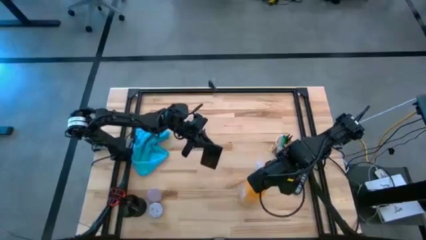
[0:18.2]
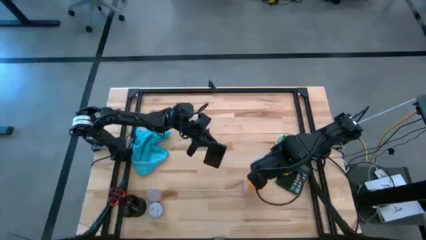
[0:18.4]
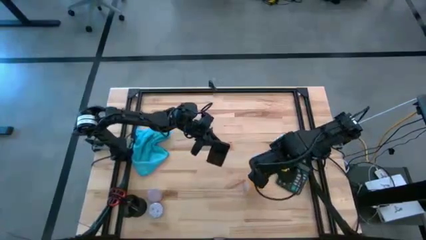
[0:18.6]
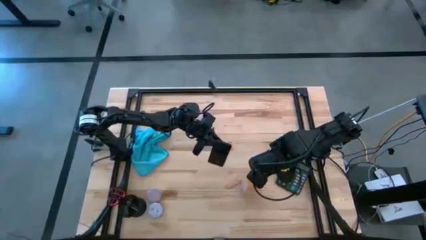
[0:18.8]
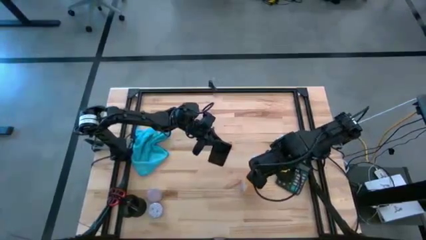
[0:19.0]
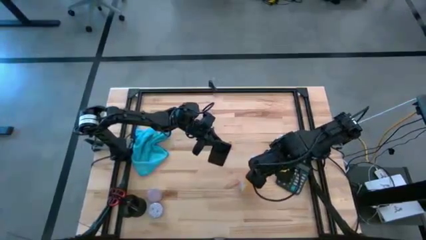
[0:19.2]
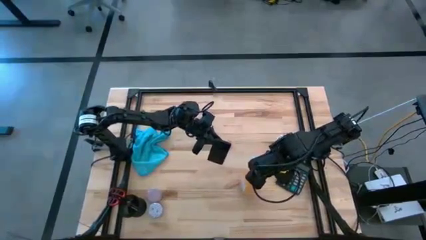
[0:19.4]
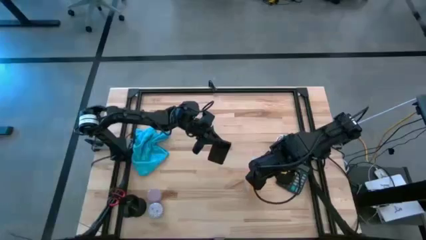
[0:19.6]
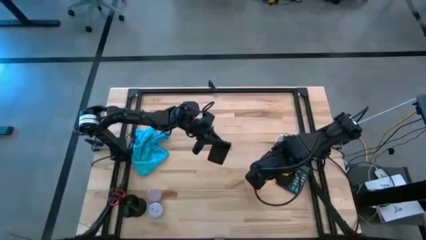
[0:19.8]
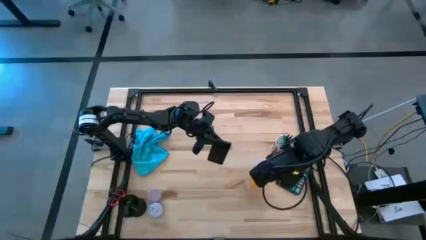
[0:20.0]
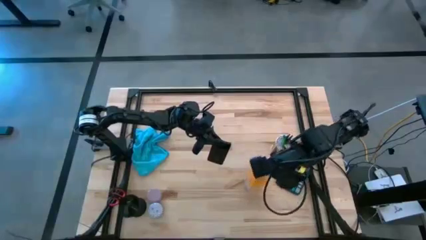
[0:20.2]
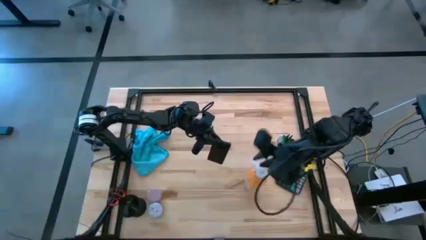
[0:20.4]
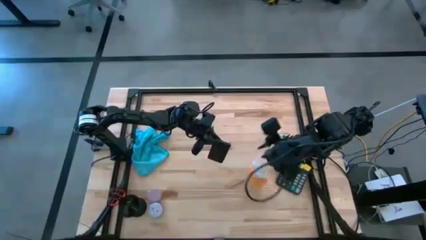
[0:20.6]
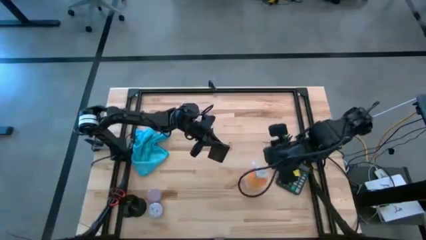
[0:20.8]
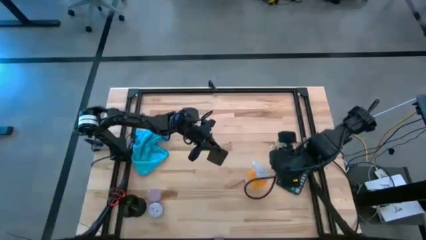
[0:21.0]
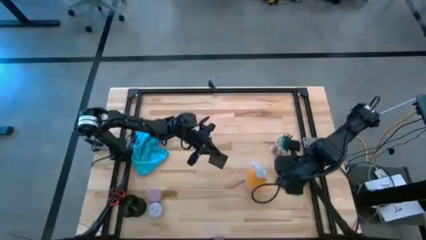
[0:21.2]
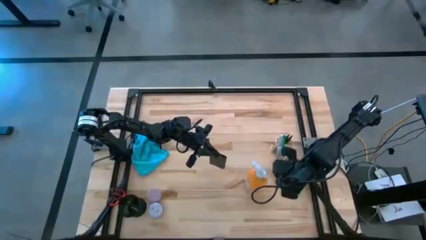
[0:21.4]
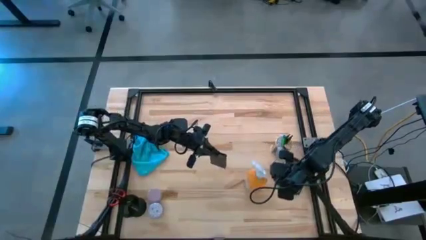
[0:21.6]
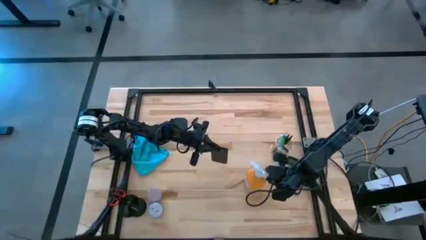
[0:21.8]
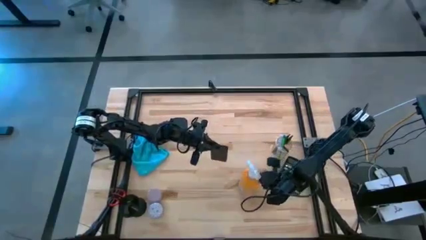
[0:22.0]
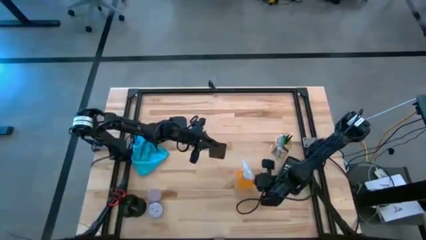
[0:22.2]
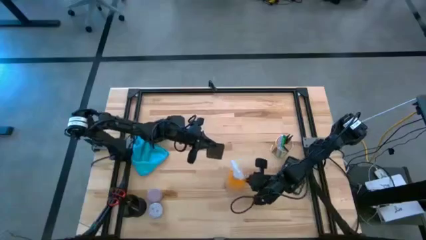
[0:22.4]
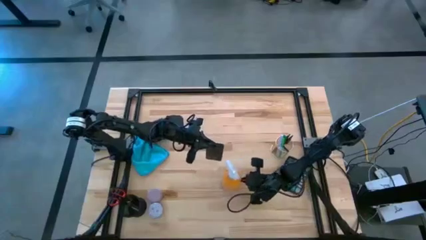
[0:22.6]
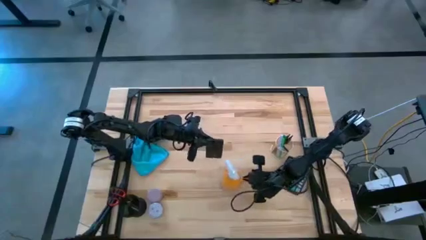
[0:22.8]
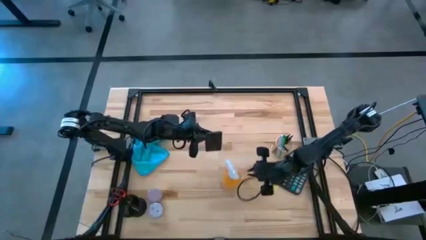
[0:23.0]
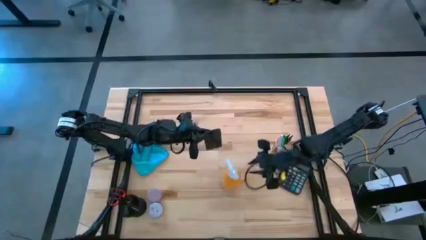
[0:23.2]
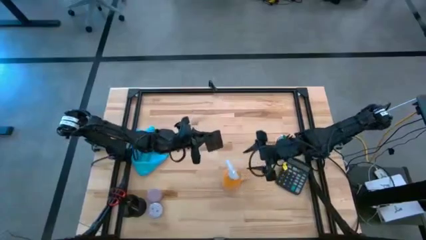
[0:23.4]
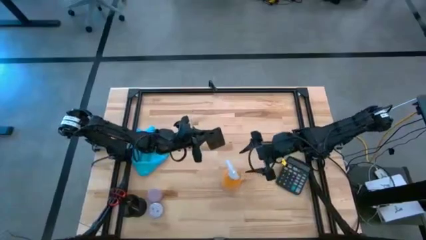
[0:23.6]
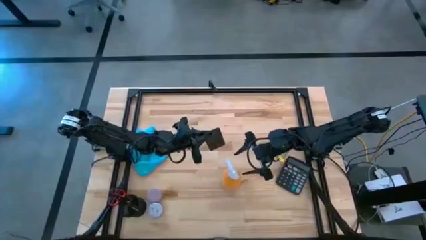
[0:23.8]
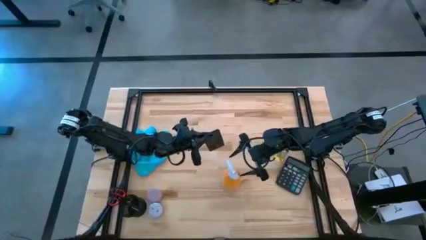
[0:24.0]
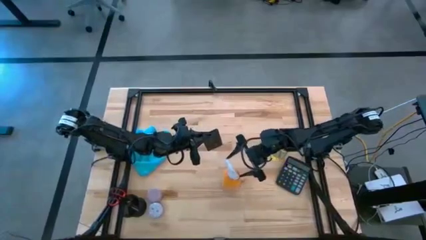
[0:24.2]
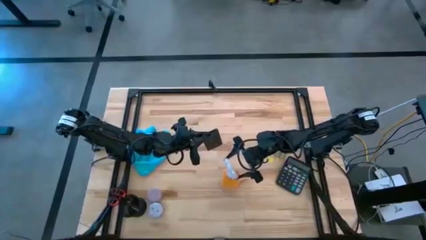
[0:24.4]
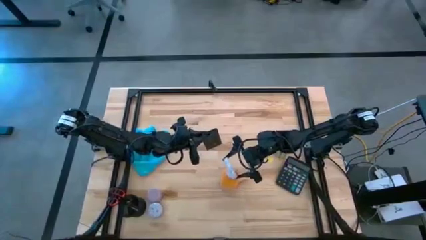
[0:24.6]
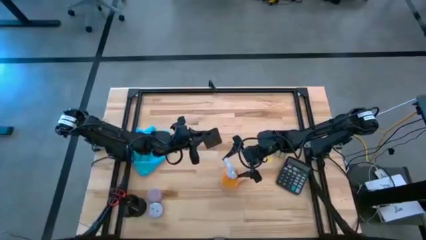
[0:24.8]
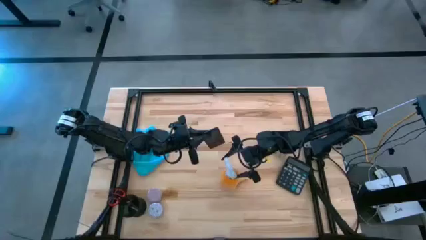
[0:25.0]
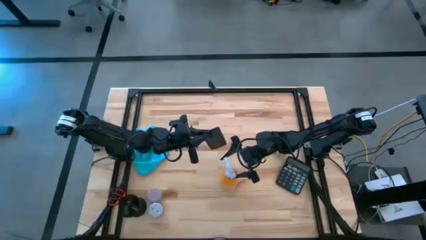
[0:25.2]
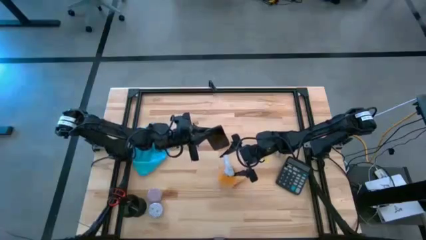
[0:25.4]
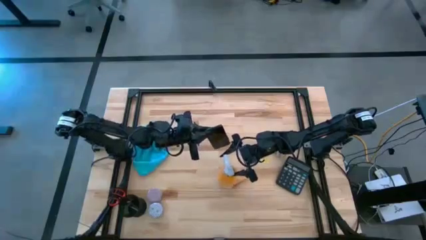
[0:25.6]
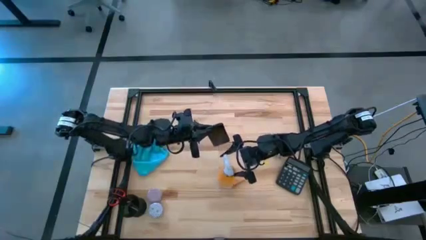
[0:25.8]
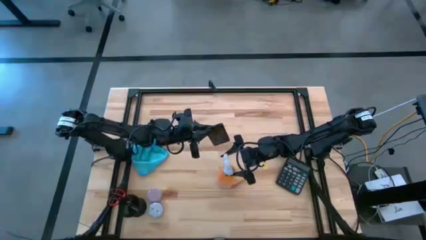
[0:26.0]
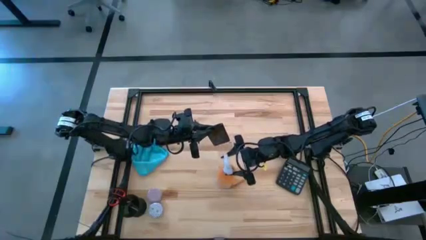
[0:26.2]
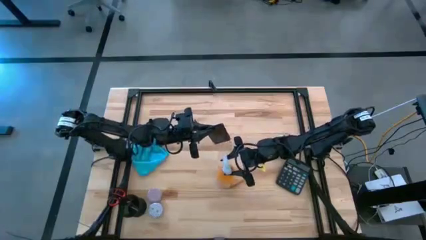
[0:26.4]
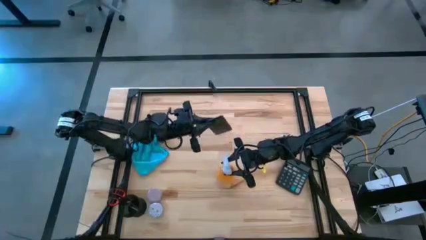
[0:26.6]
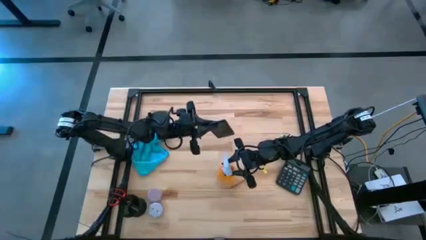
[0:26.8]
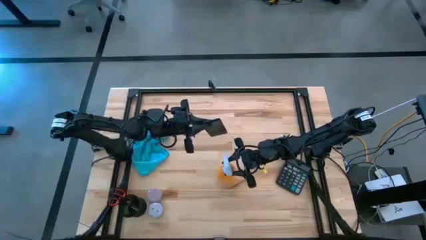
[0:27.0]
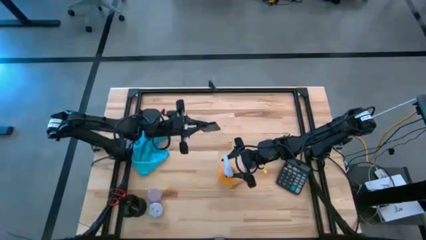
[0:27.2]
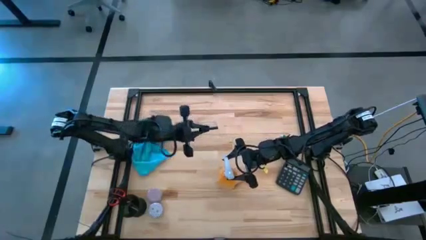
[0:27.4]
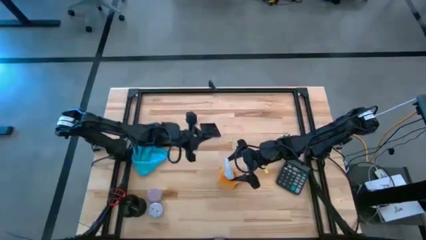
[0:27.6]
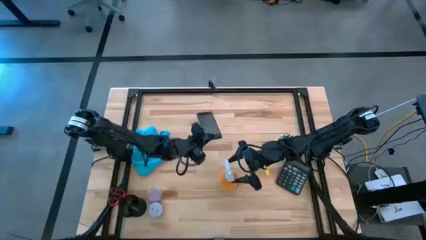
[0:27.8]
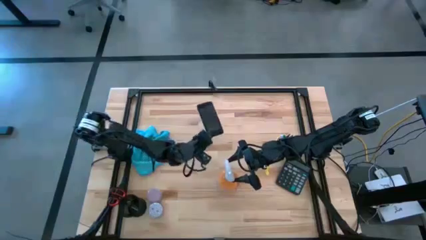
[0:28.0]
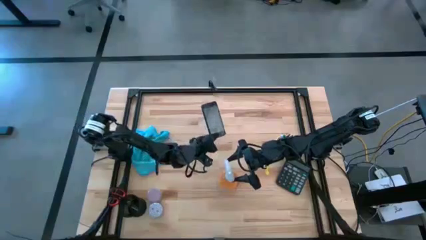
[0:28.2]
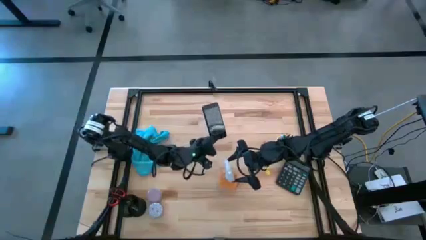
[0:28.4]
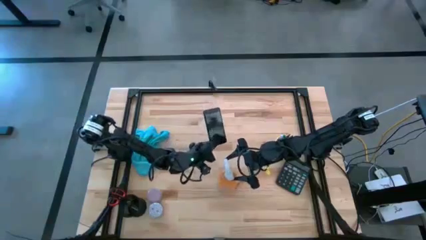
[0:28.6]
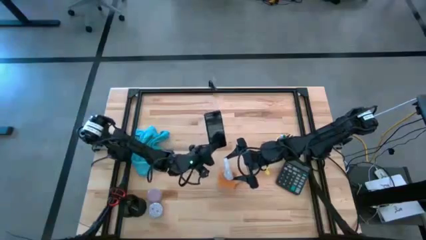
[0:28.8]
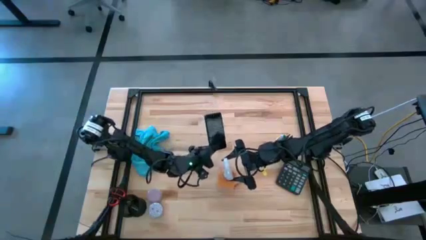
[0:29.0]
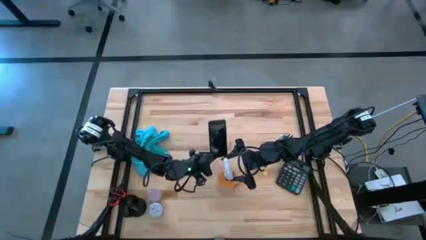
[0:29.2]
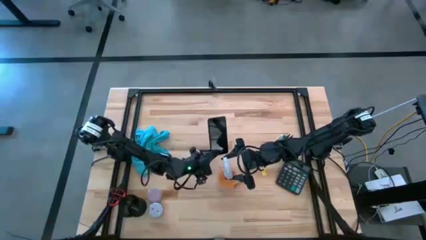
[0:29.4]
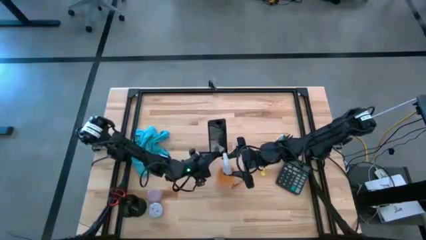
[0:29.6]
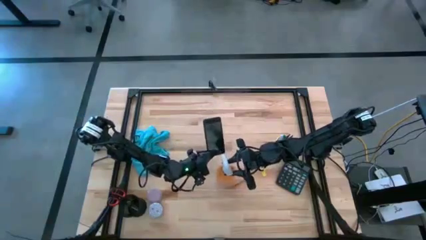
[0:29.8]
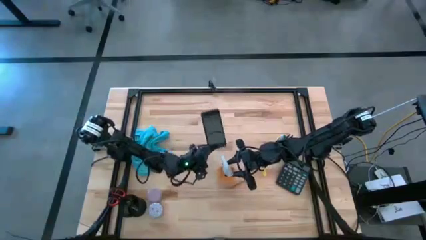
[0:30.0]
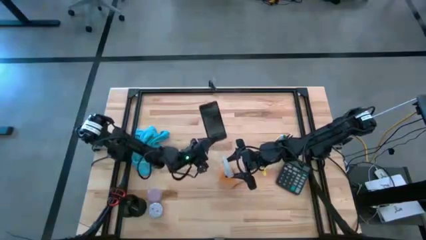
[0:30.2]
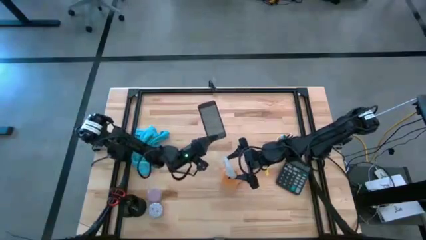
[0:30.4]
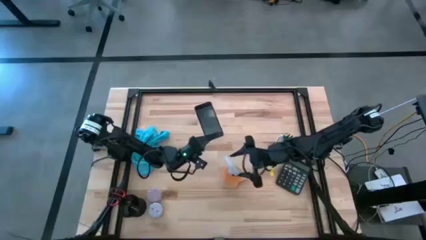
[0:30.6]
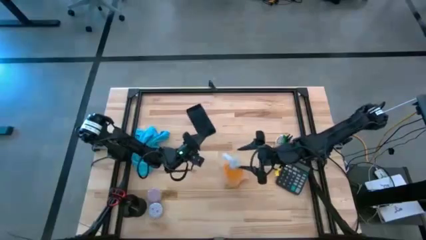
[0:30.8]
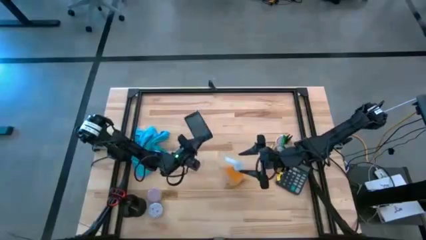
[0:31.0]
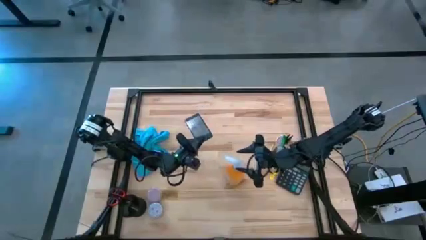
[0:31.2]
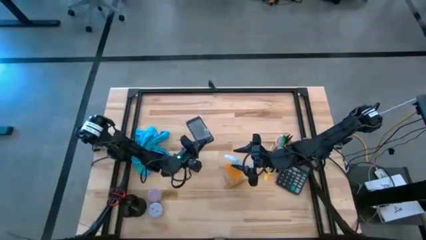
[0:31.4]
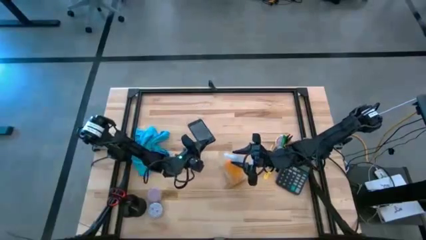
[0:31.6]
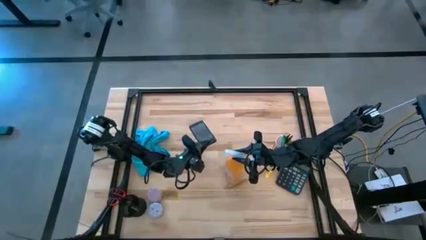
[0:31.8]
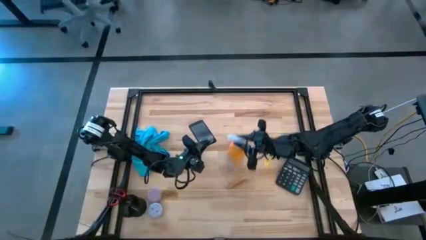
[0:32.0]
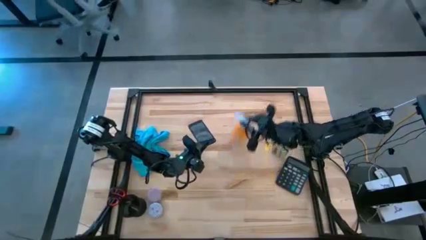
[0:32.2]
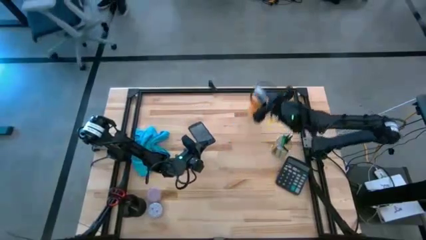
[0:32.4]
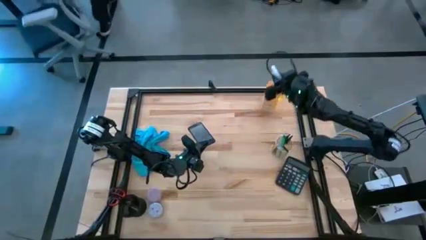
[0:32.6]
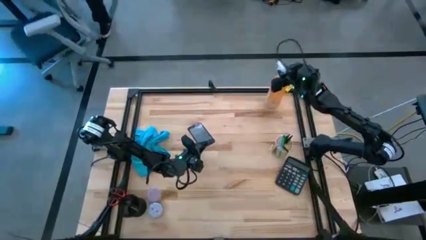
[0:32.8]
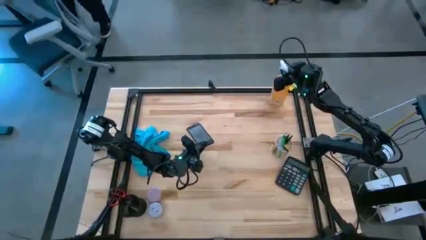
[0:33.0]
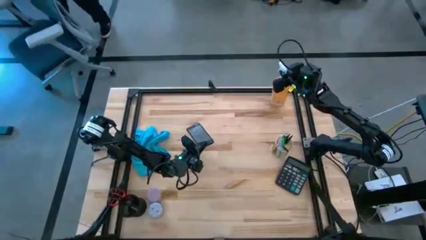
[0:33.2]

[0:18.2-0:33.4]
Task: Apply microfiber cloth
Spray the front and back of the black cellphone using the orange spray bottle
